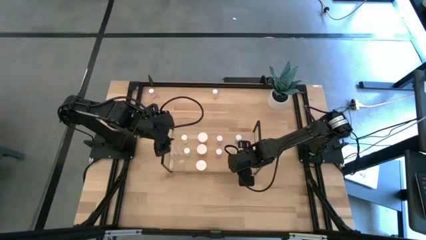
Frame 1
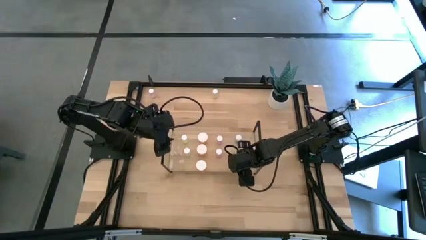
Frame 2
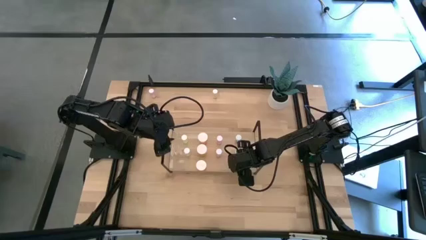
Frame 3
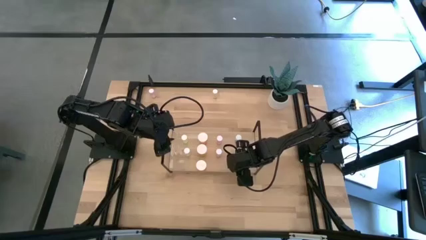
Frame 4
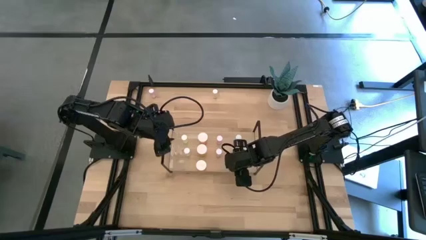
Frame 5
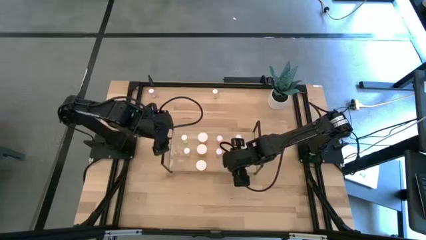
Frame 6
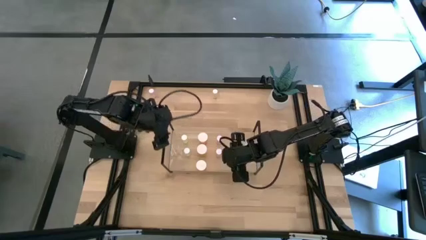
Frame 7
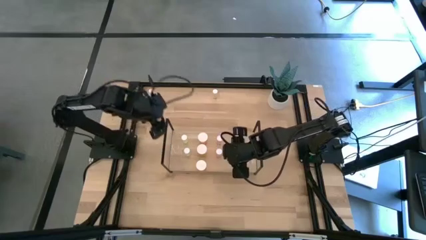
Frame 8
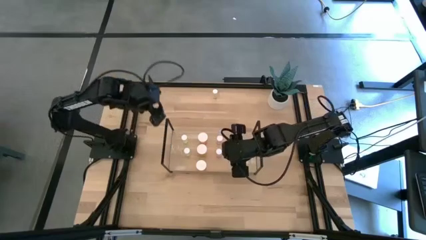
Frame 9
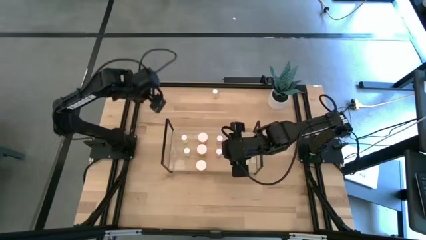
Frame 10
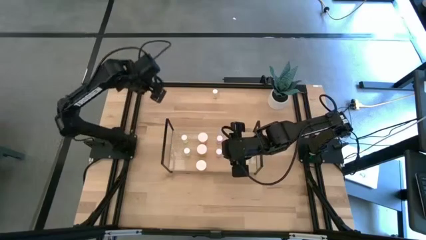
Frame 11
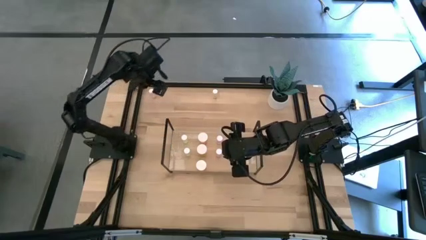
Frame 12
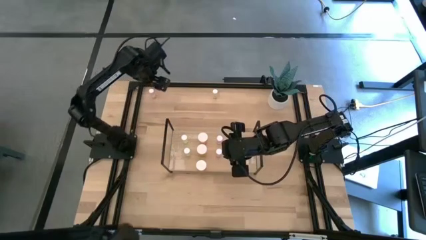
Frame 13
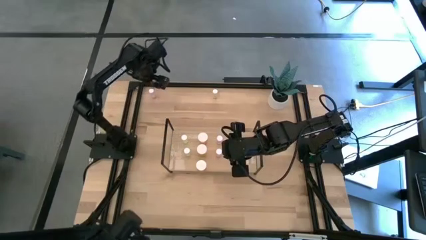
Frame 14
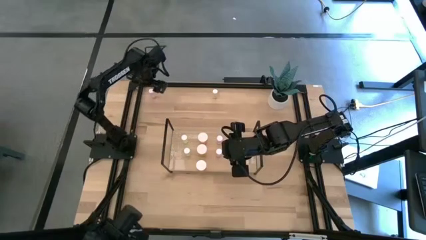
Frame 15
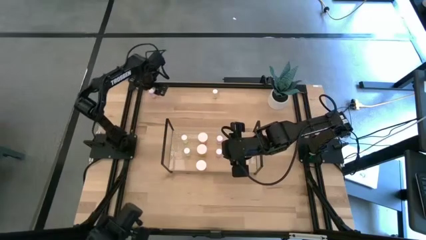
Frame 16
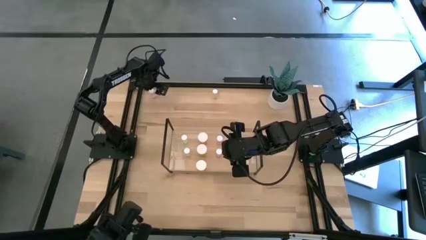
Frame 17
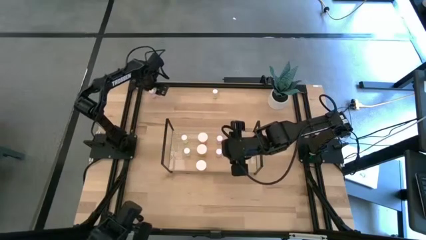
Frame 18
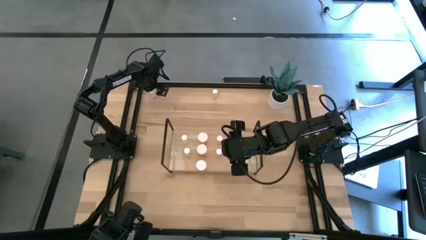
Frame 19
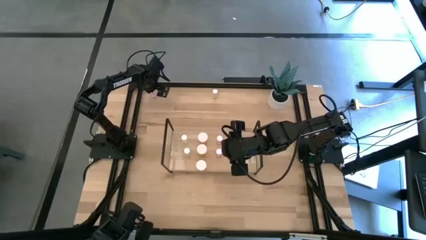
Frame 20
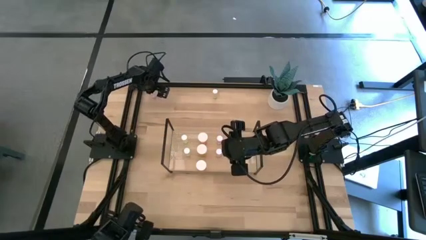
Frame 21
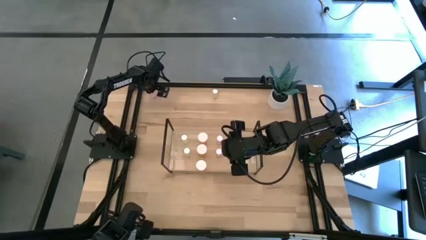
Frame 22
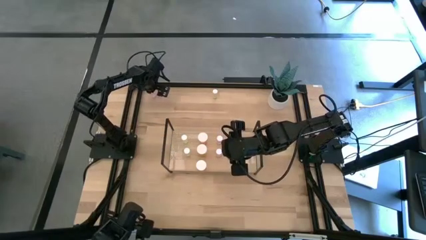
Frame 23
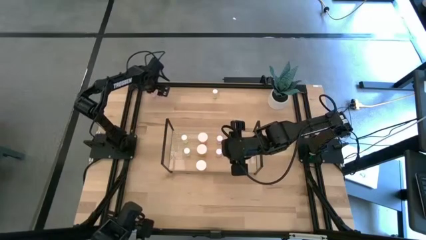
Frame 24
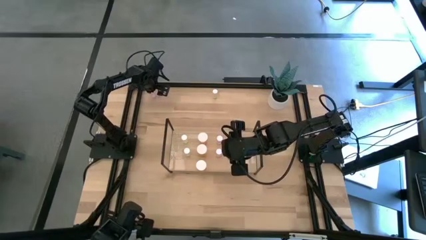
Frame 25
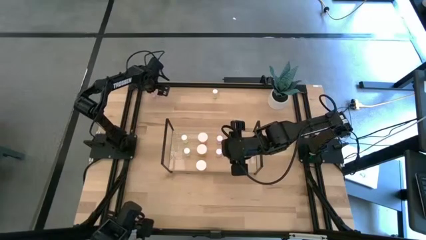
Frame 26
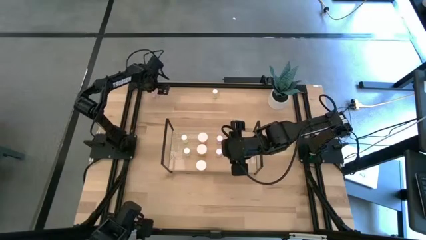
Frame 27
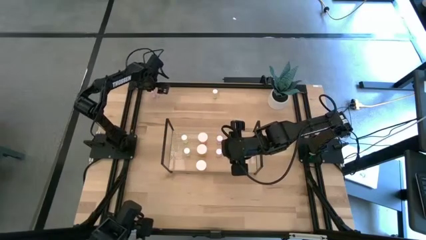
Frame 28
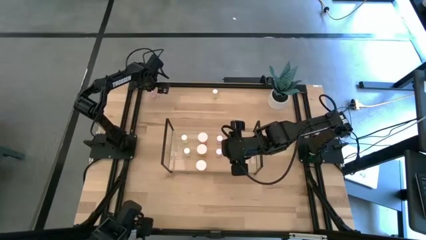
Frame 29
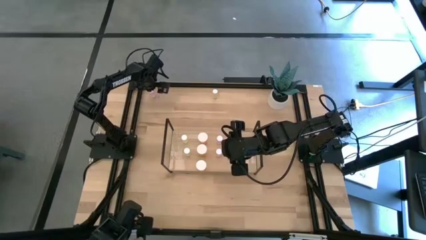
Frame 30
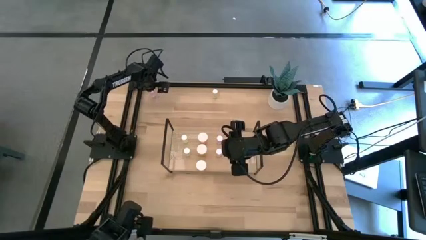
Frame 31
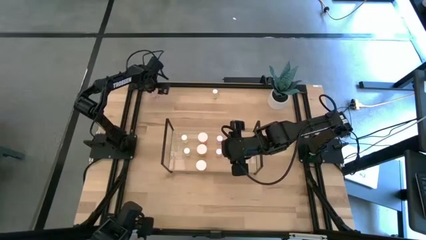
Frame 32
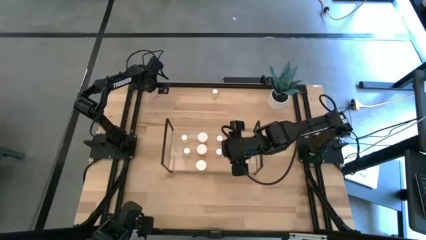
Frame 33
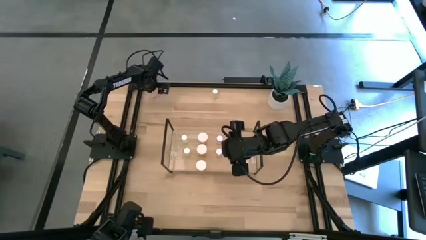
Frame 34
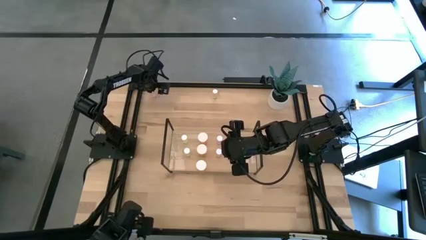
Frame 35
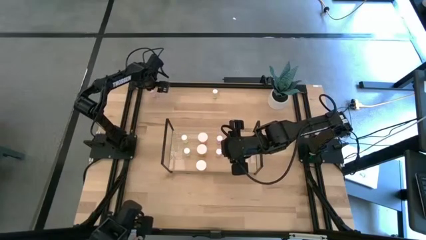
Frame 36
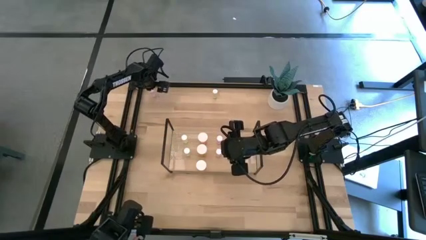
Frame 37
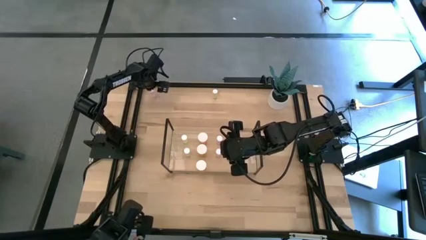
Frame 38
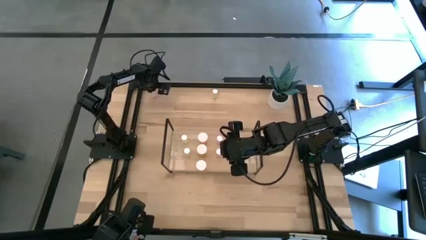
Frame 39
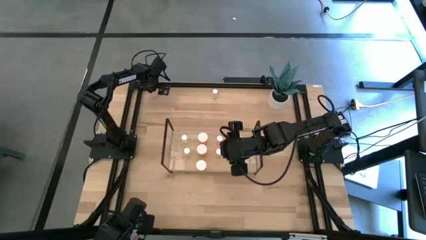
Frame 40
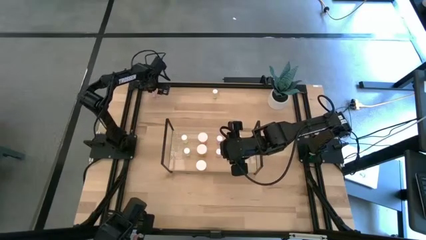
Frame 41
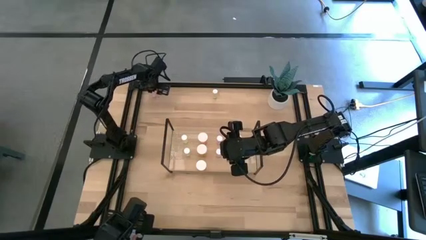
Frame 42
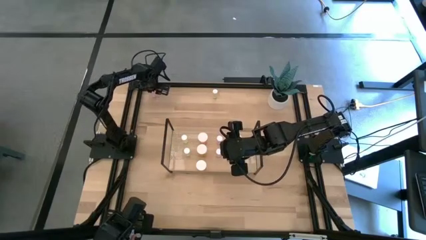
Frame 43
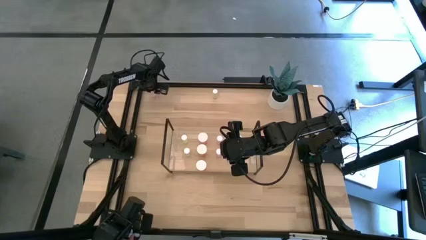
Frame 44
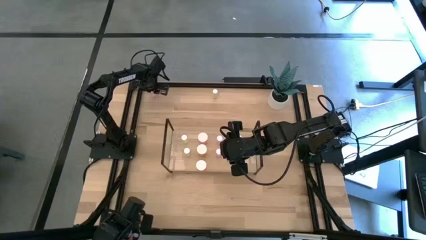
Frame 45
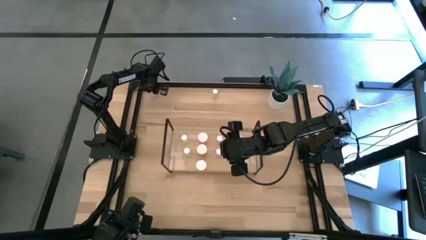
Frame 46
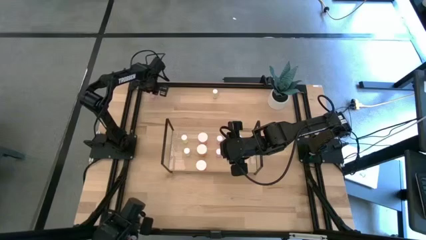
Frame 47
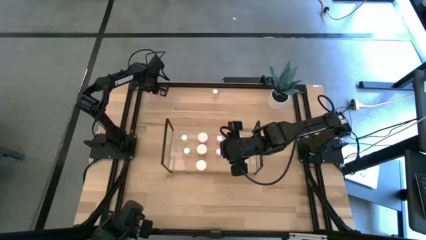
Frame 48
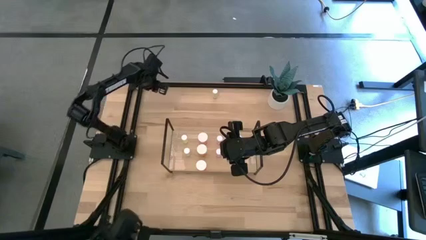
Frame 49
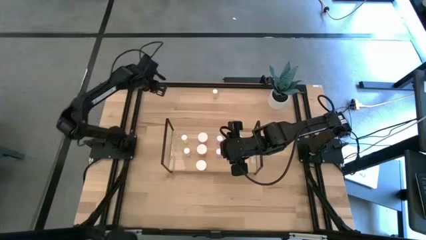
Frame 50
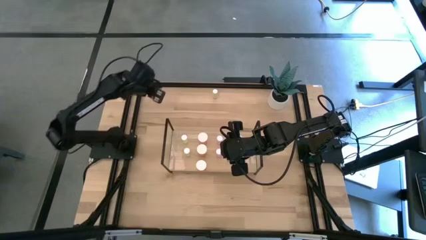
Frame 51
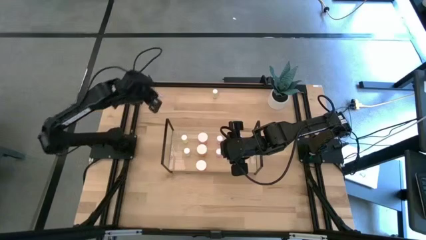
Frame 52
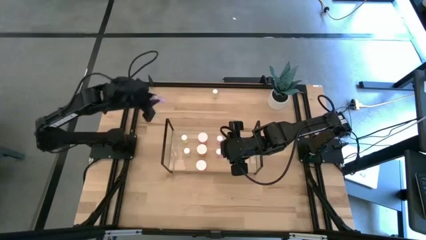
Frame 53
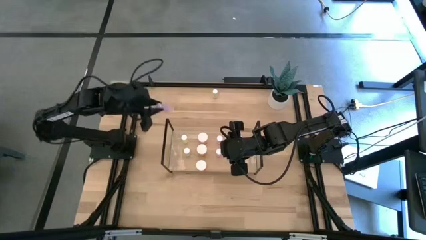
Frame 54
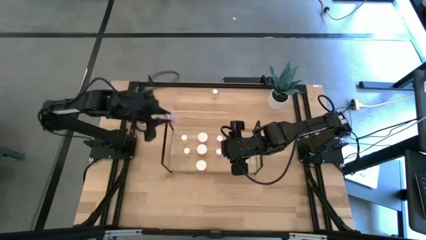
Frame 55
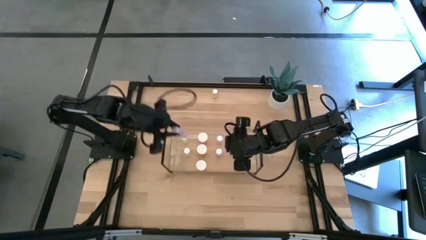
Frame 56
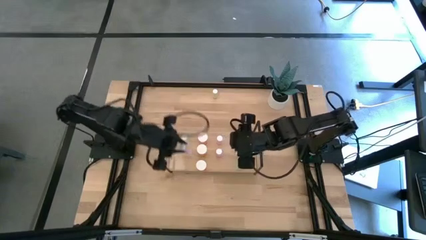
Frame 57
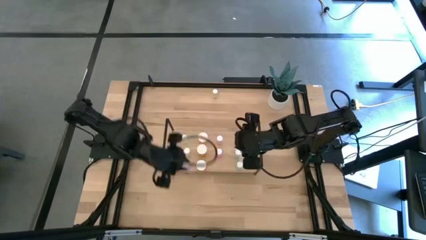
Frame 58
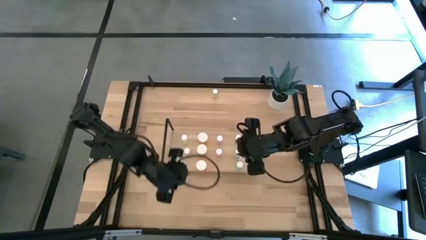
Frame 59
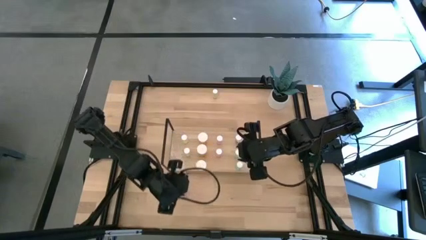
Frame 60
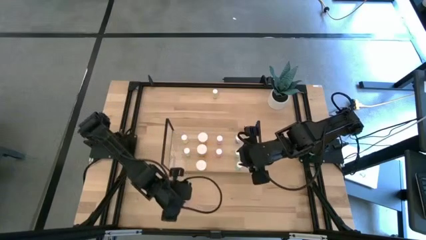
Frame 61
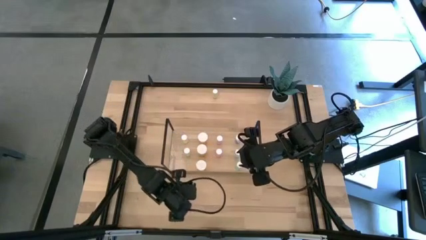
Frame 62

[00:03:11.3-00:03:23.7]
Task: Pick and place medicine bottles onto shelf by color
Put the pink pill bottle aligned with the pink pill bottle on the shelf

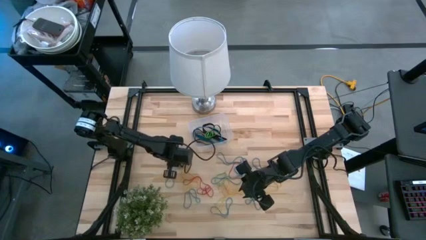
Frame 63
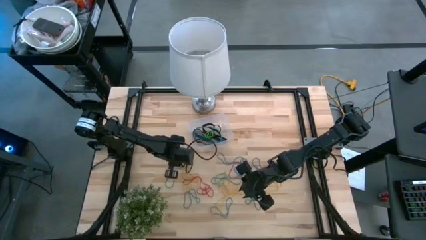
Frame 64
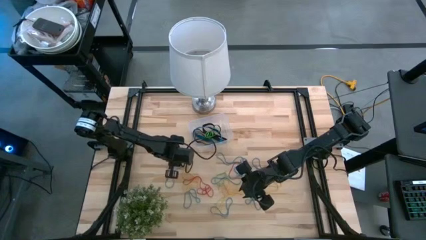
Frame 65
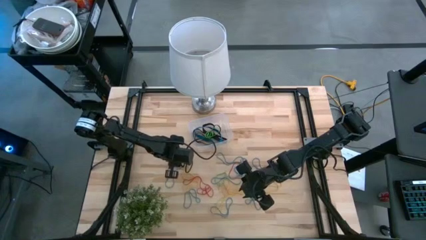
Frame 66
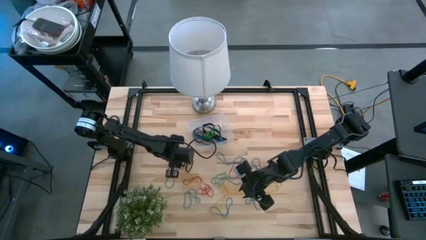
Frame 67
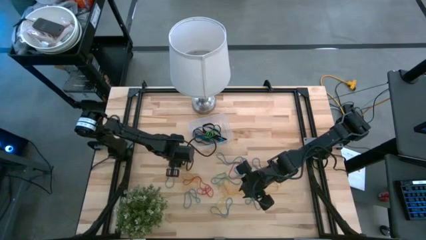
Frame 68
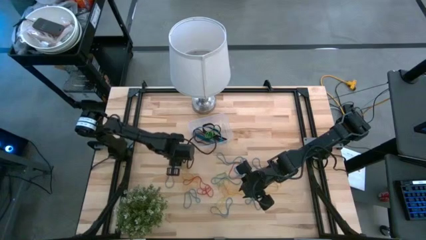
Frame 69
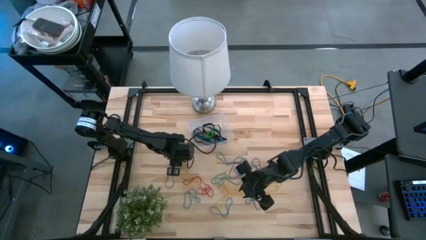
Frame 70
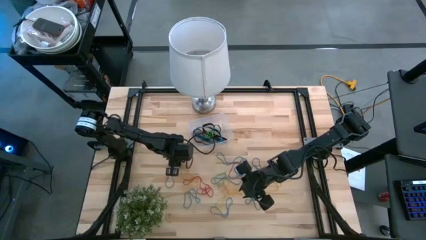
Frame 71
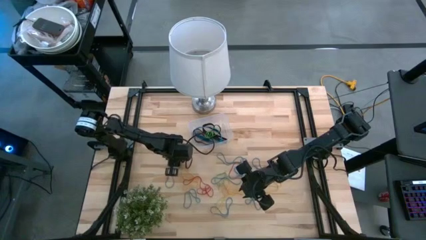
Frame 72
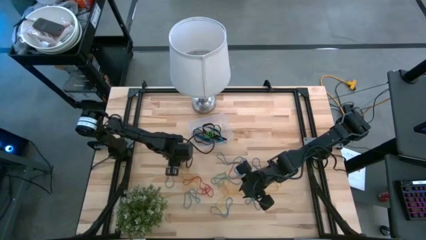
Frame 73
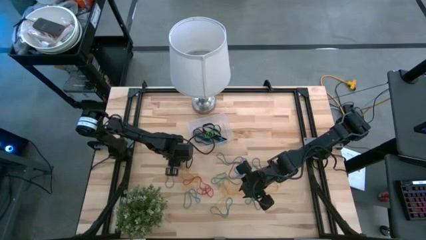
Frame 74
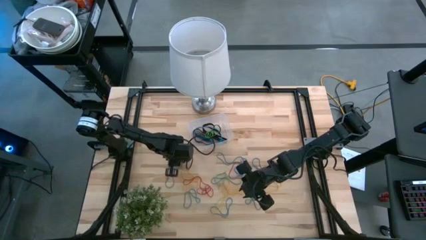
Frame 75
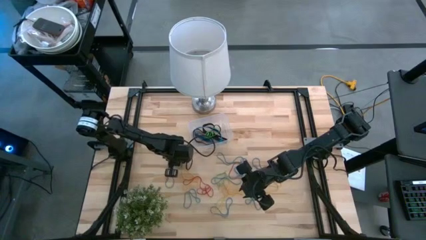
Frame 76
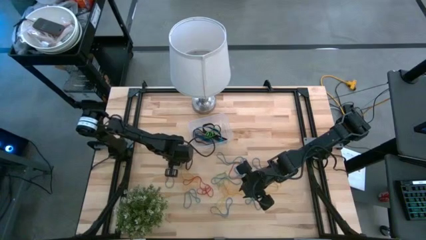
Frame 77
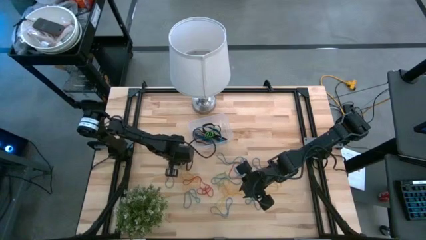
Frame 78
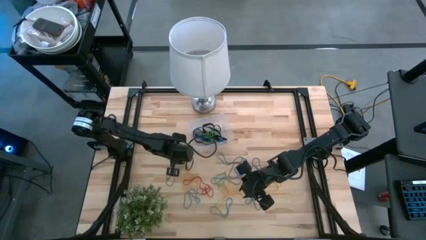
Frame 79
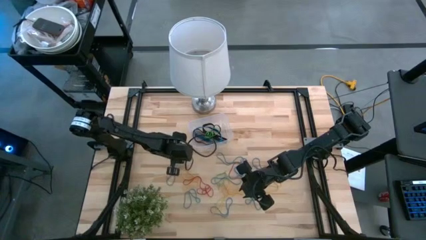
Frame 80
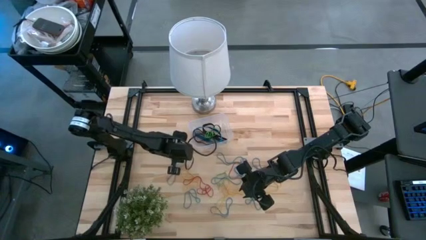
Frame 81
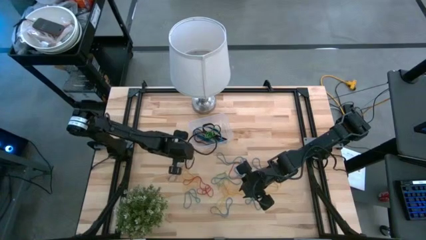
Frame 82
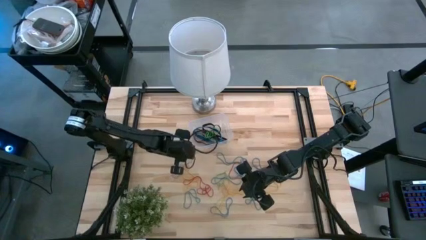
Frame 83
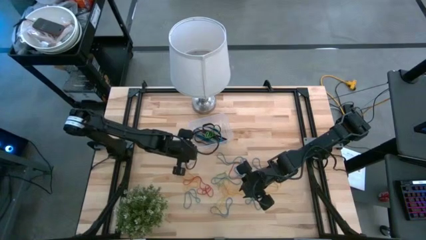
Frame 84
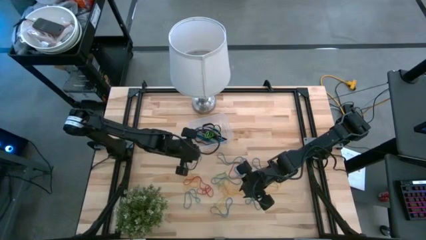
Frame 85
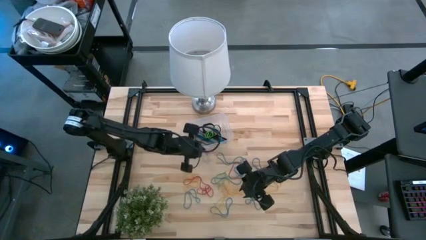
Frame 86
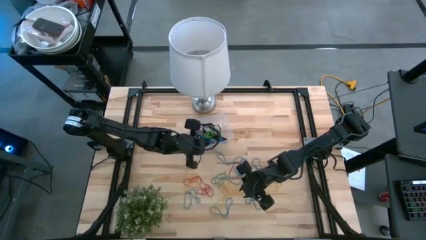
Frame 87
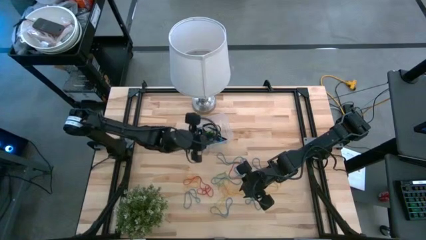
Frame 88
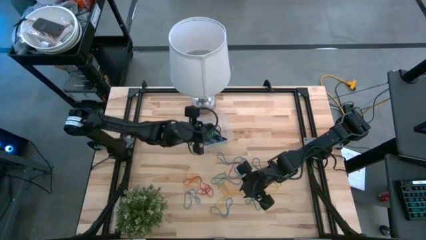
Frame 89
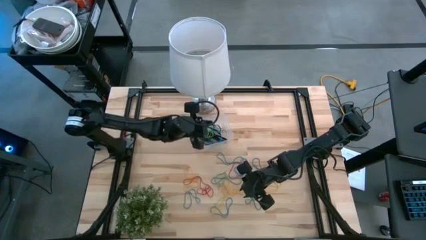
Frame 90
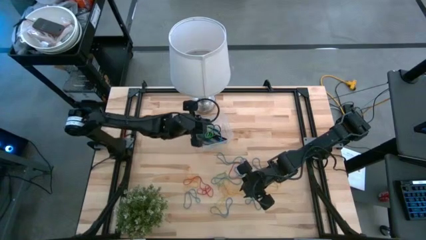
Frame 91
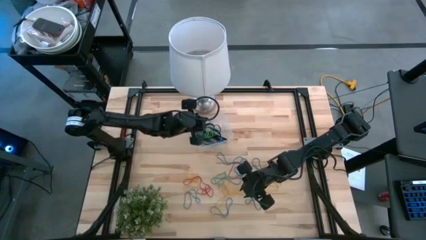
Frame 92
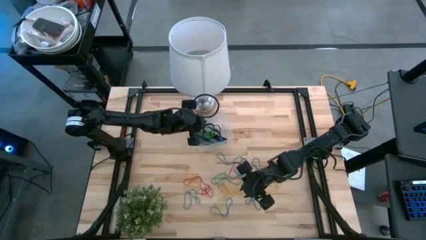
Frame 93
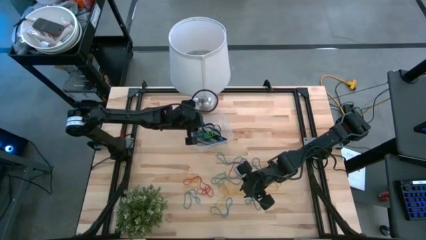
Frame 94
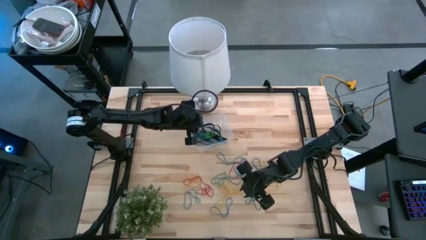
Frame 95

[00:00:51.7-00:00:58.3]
Task: Pick and place rubber bands into bin
Put the blue rubber band into the transparent container
